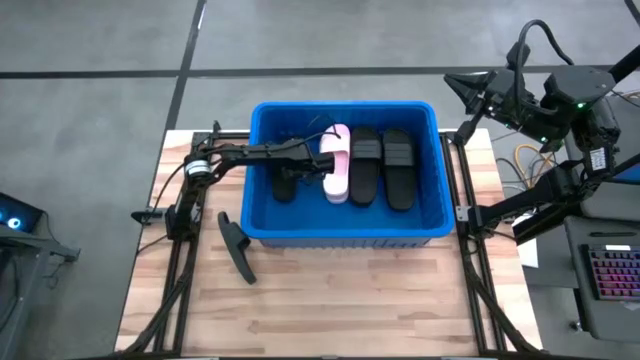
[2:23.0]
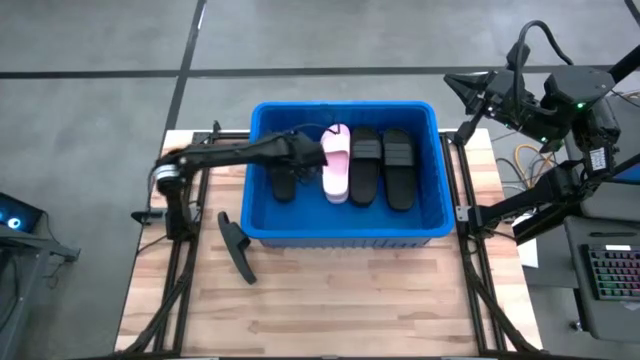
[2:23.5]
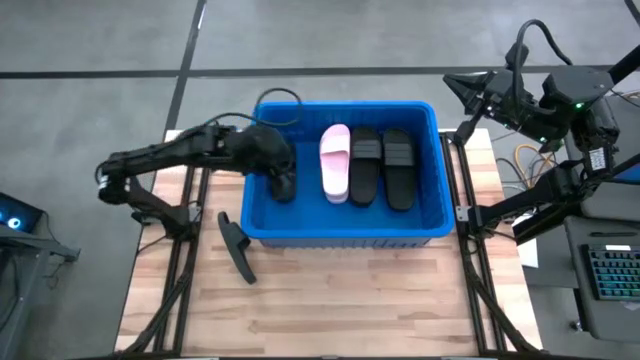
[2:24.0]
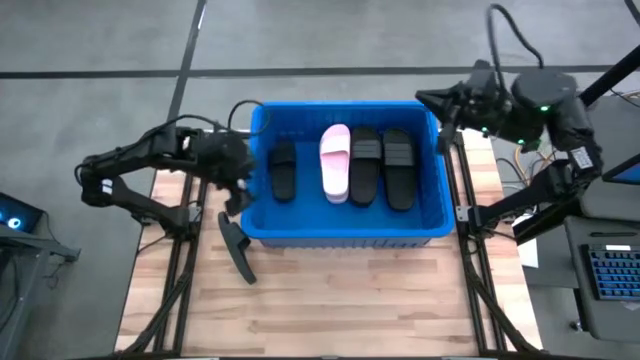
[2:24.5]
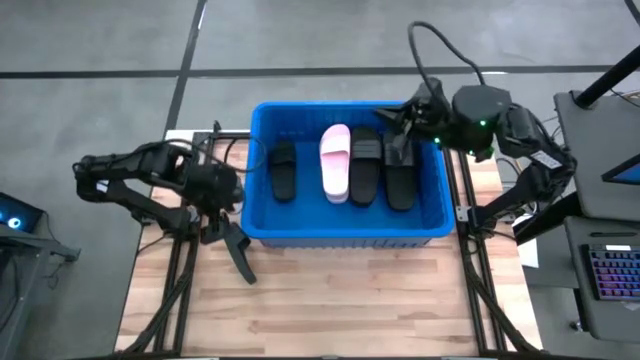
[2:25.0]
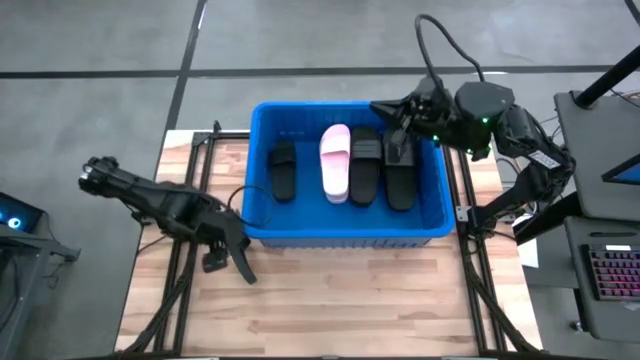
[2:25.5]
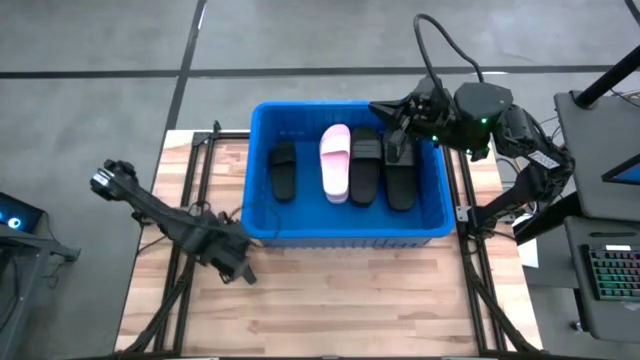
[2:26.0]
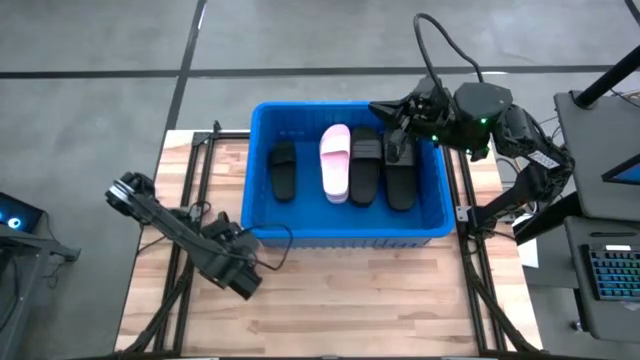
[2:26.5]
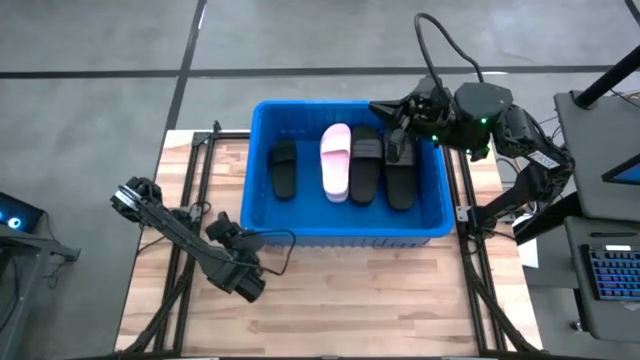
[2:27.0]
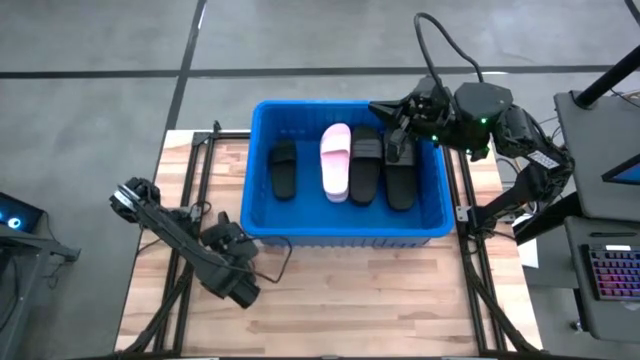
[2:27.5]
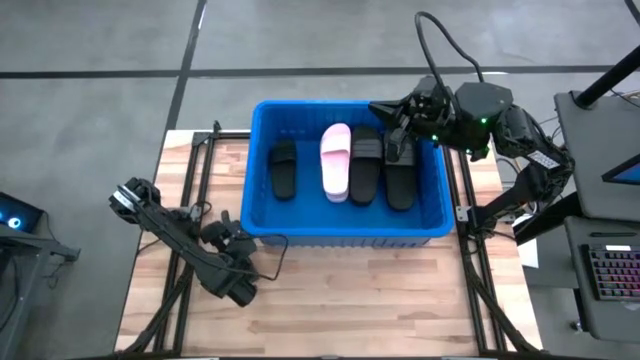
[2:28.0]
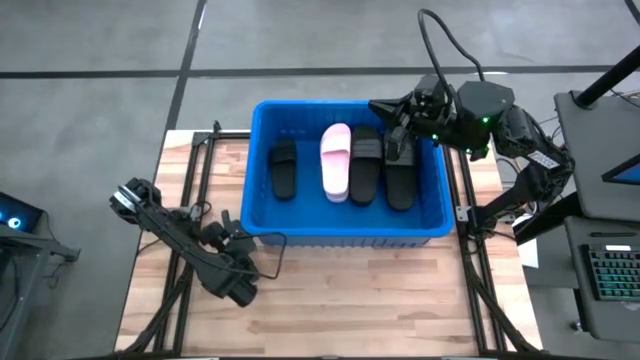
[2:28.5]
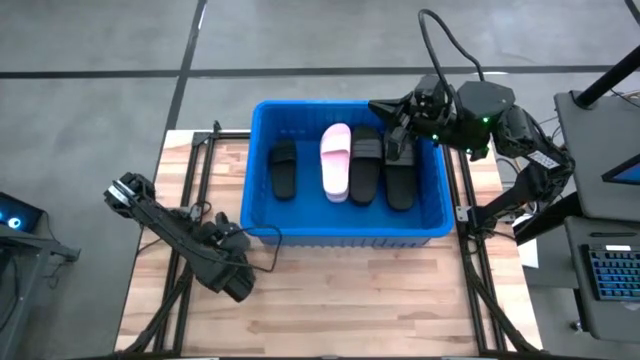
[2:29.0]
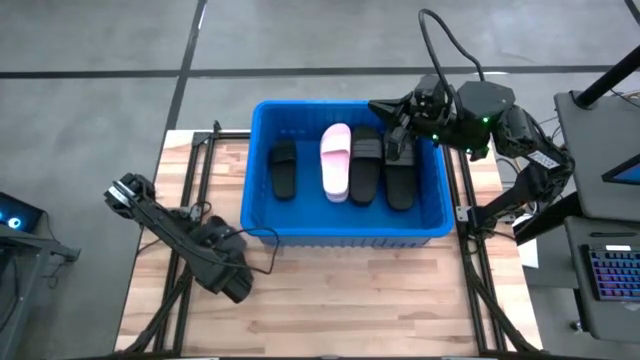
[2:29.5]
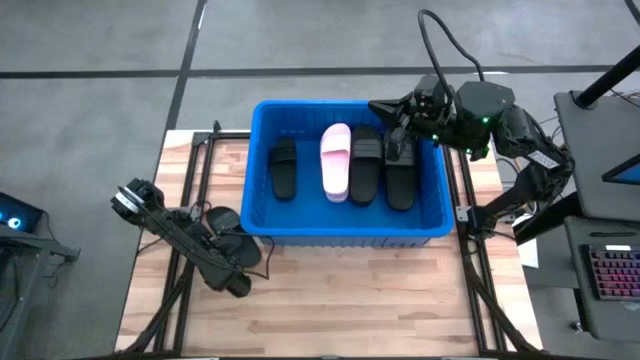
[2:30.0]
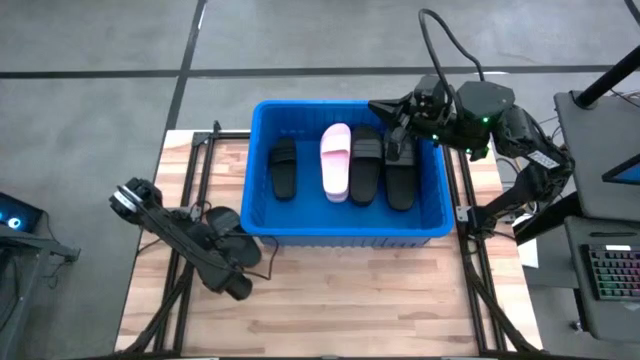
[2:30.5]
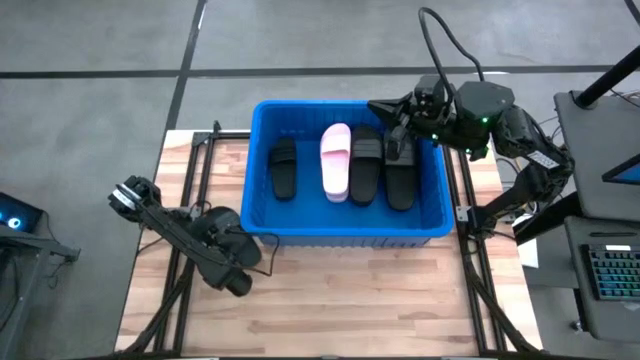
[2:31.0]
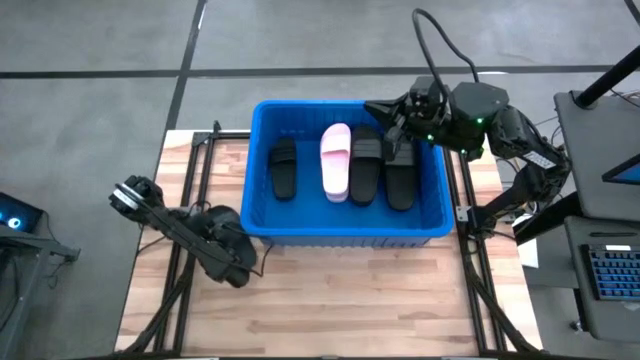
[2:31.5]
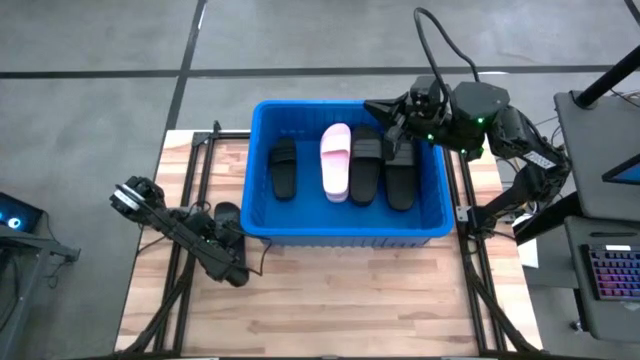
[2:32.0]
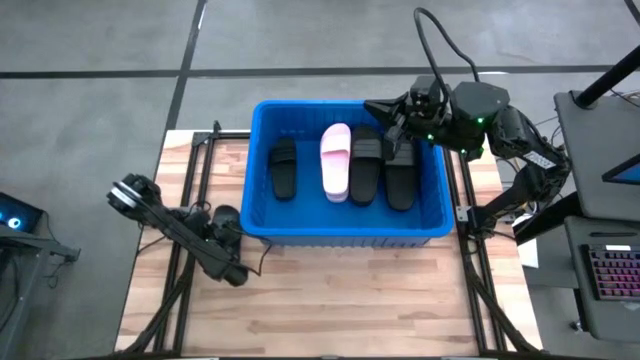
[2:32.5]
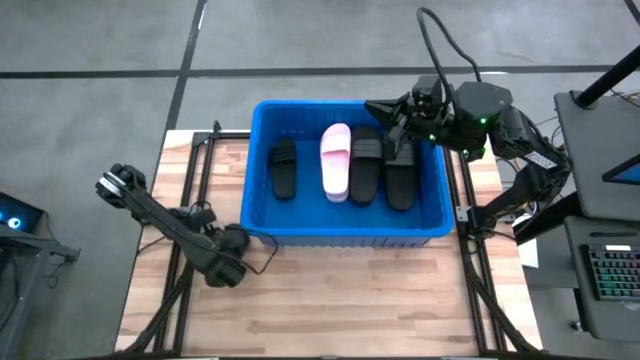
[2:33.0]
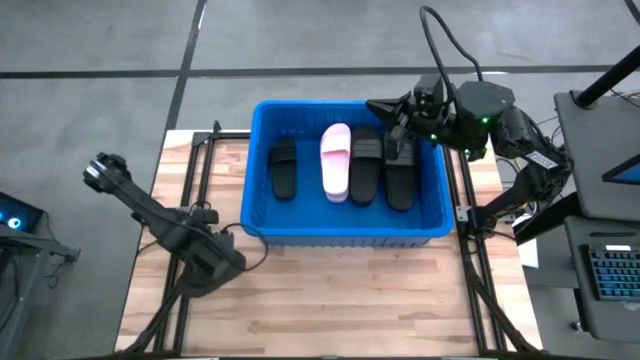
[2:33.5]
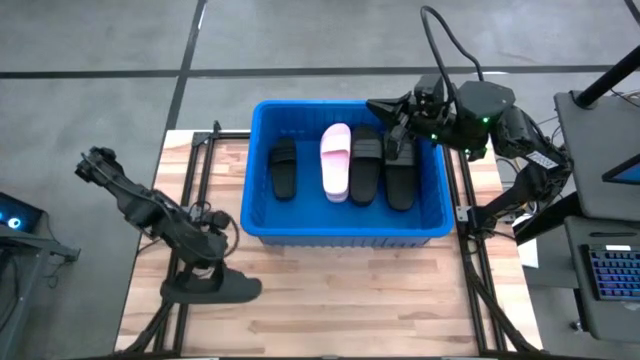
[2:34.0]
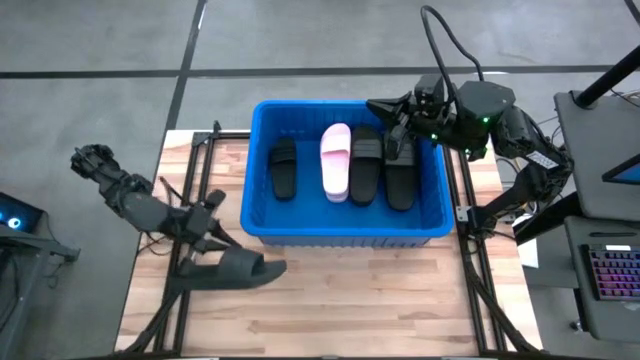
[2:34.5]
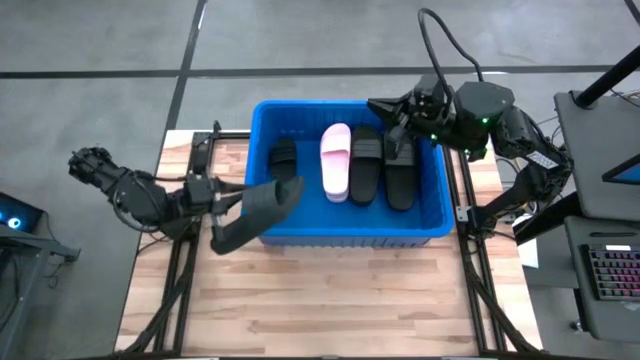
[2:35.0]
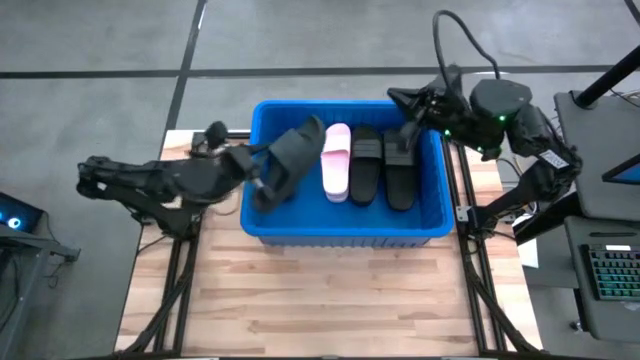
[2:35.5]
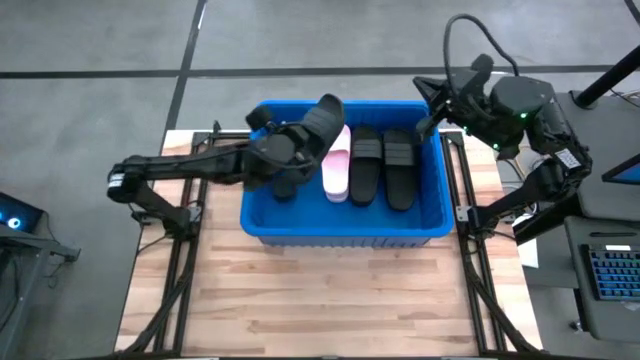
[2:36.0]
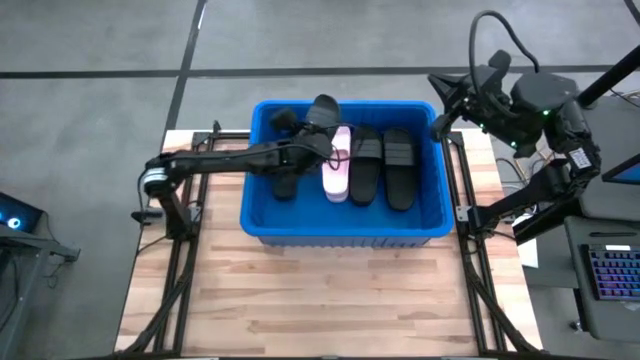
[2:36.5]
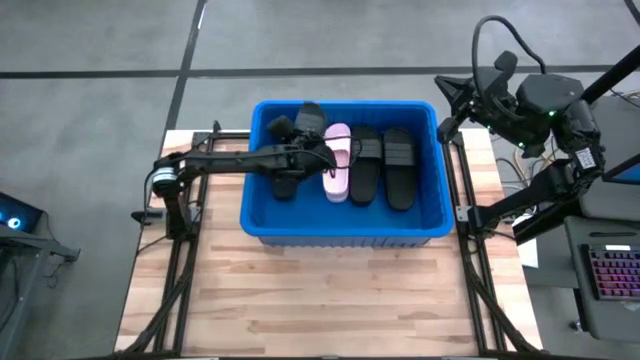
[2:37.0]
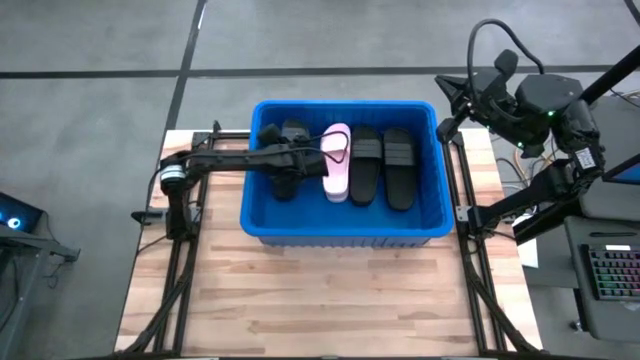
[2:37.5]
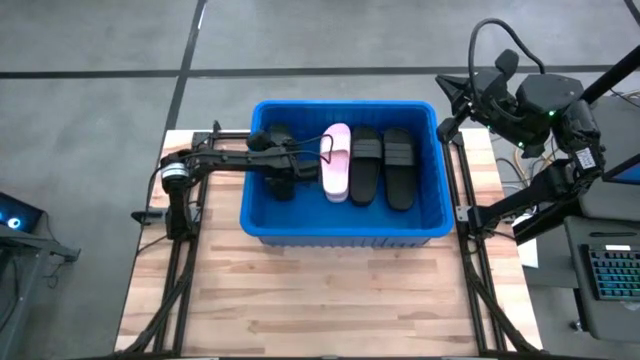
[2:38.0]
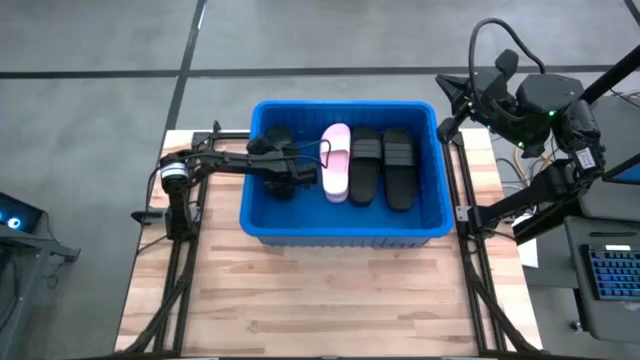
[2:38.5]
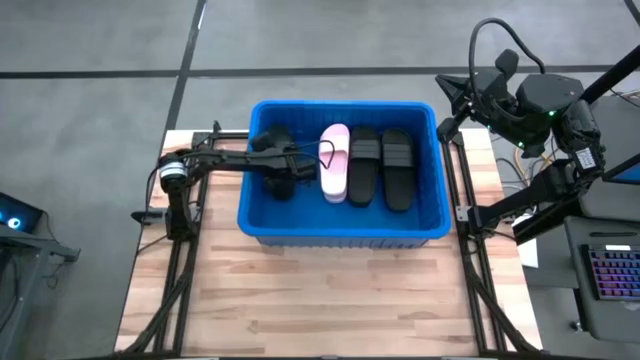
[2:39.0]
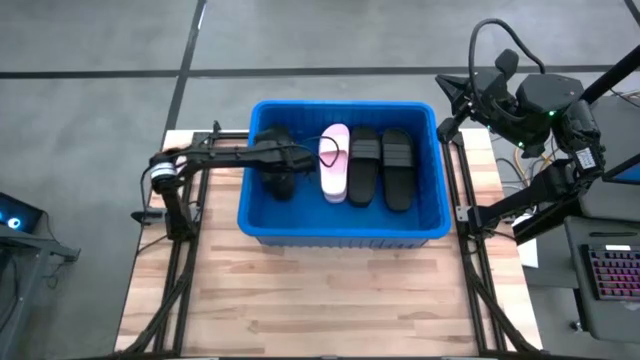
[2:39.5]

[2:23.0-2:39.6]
Task: Pick and place slides into bin
Put the black slide into the blue bin

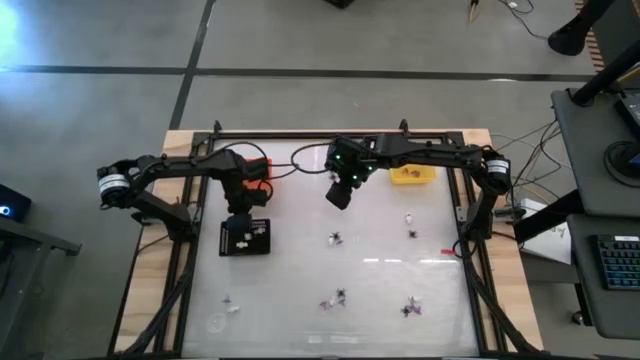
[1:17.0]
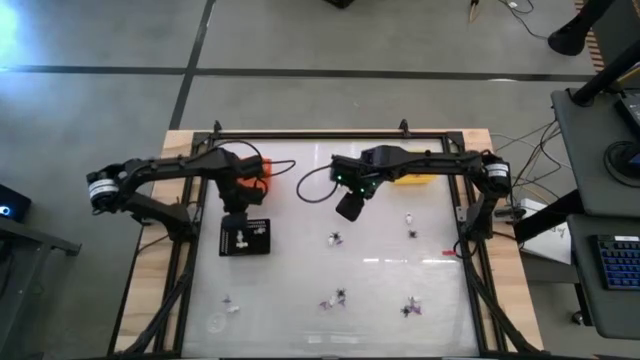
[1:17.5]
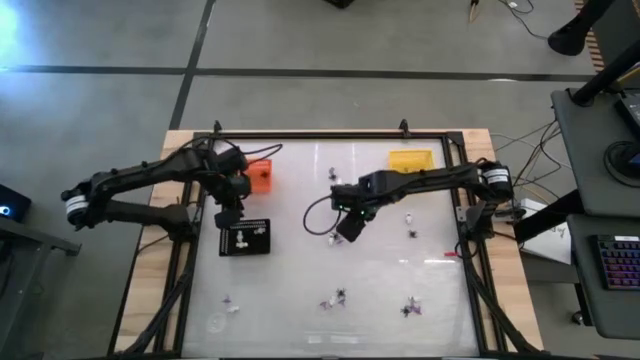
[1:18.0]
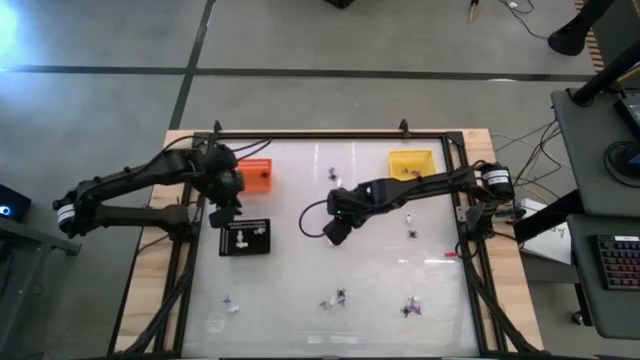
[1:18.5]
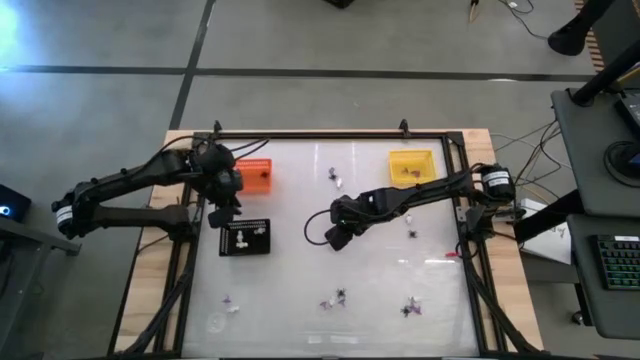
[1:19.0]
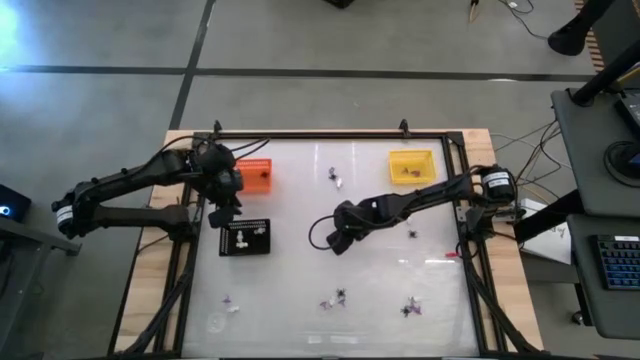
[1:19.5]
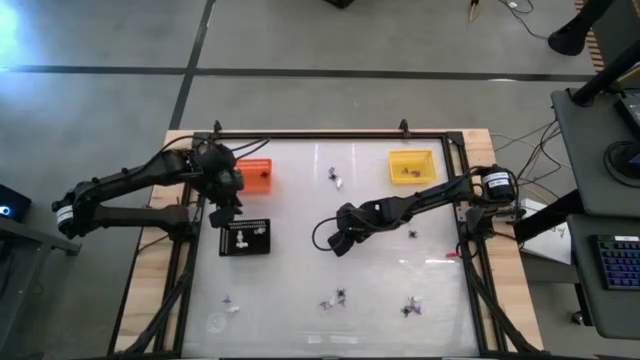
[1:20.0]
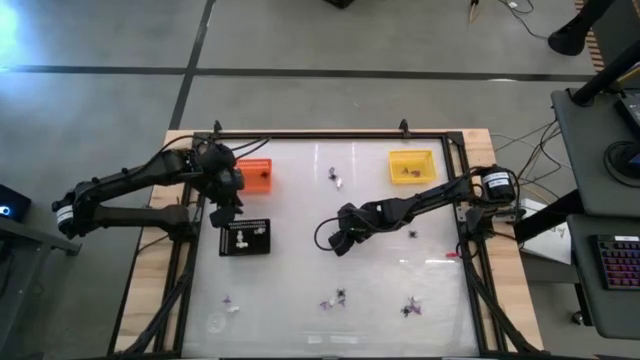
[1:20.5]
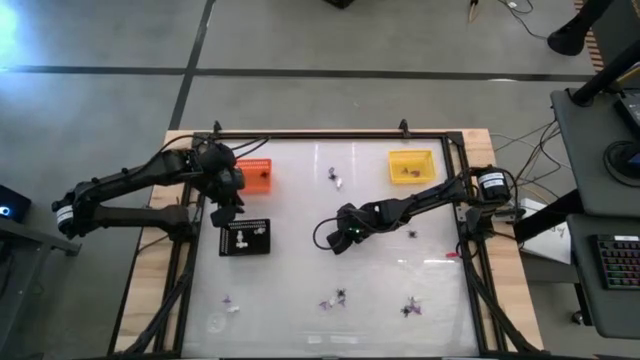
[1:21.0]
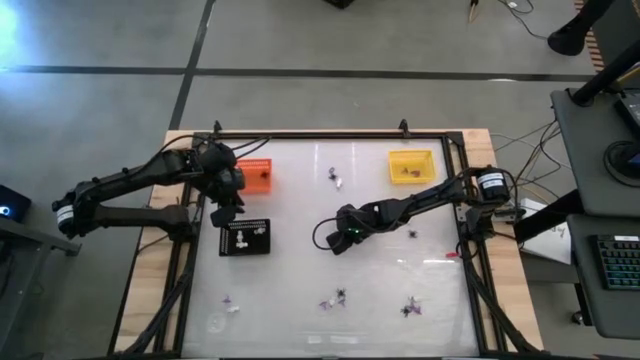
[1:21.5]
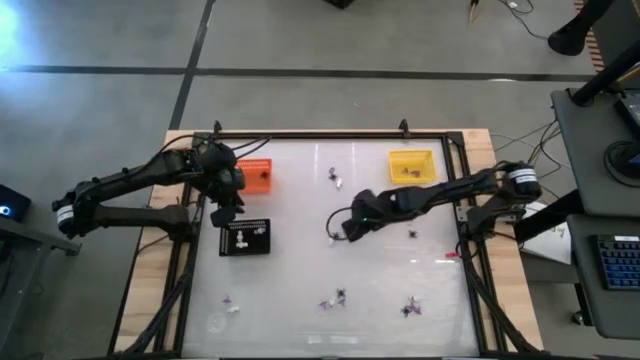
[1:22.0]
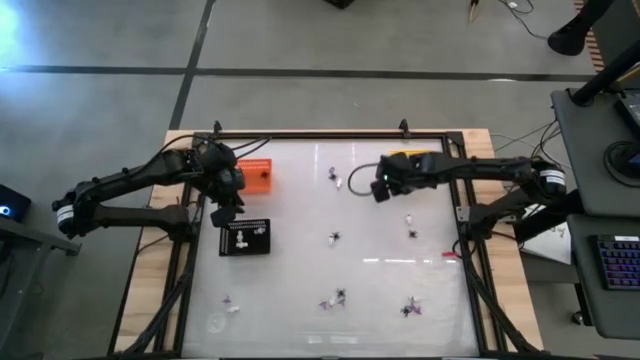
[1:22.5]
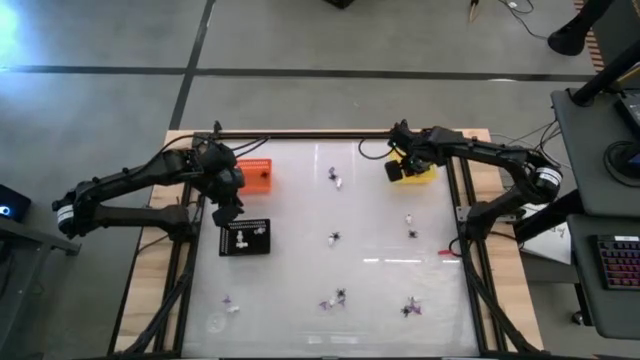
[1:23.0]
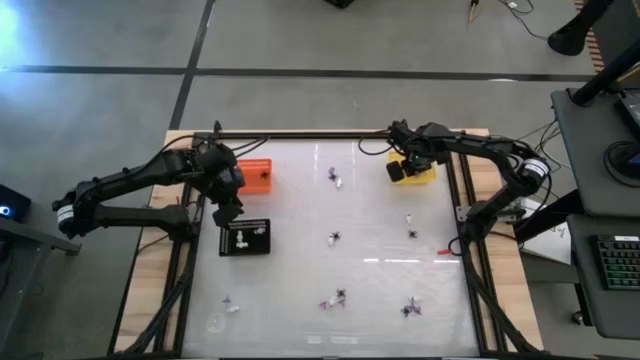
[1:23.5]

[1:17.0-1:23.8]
Task: Sort Halloween decoration
Put the purple witch hat toy into the yellow bin
